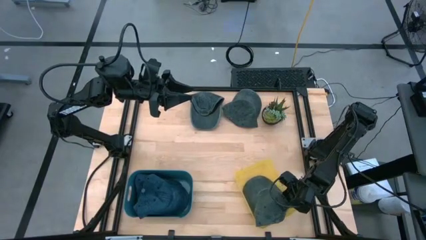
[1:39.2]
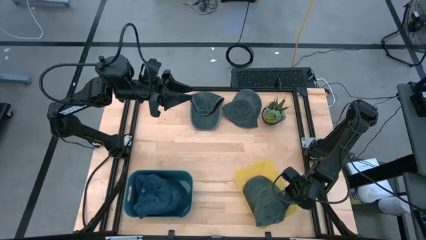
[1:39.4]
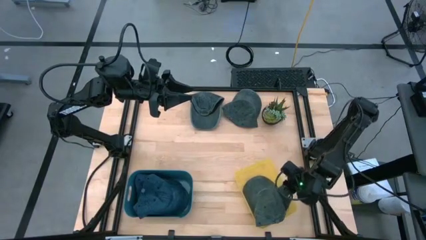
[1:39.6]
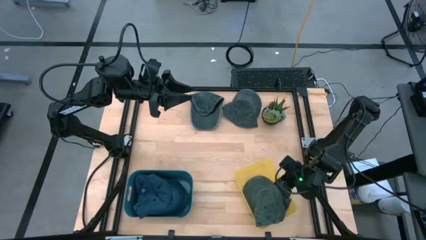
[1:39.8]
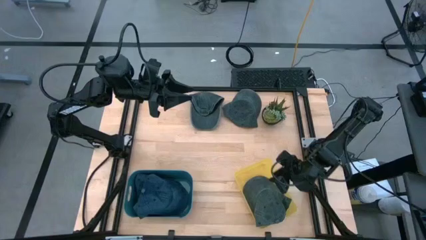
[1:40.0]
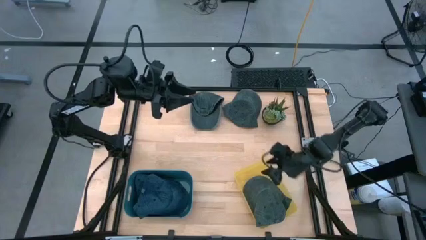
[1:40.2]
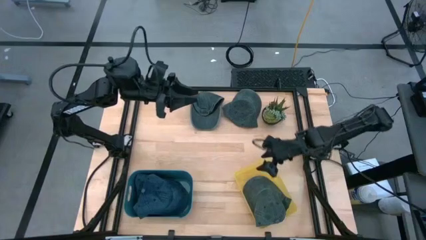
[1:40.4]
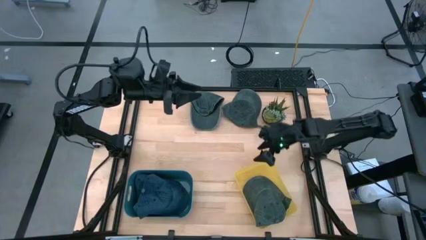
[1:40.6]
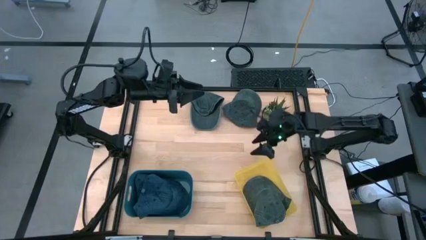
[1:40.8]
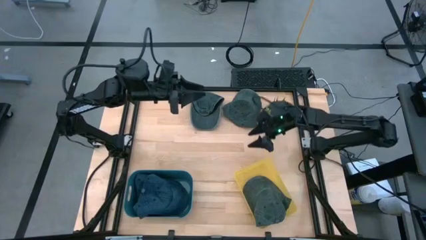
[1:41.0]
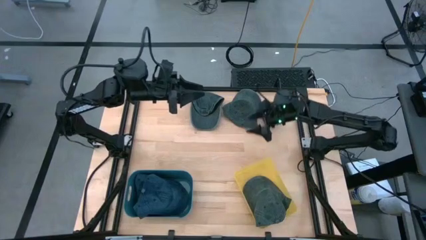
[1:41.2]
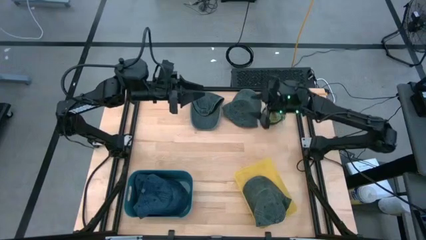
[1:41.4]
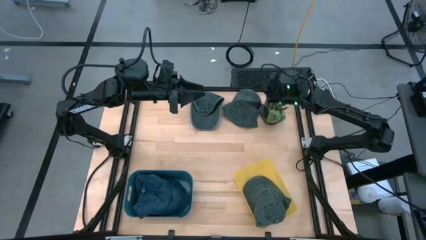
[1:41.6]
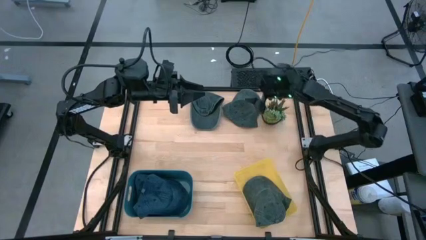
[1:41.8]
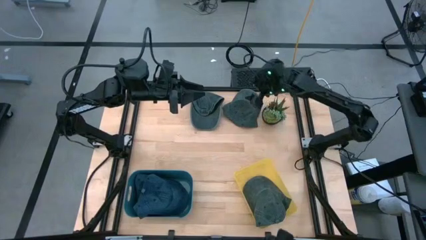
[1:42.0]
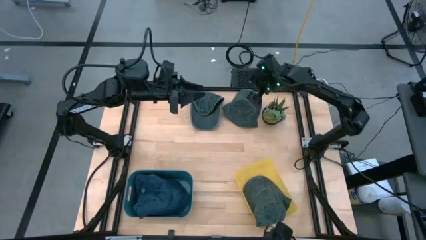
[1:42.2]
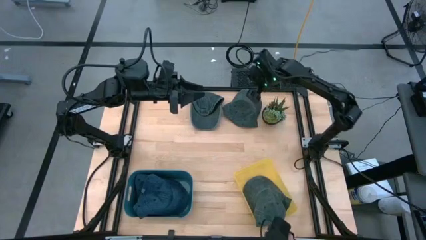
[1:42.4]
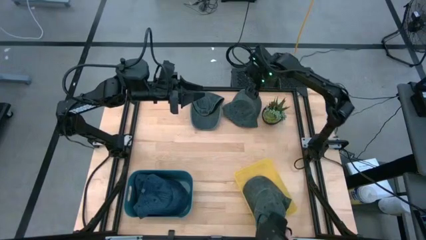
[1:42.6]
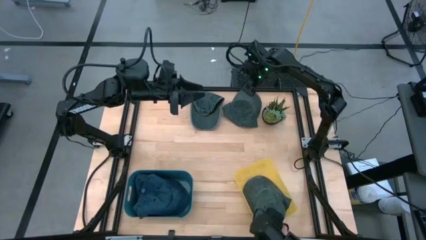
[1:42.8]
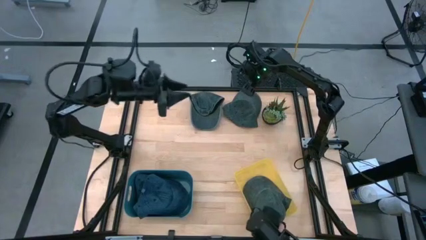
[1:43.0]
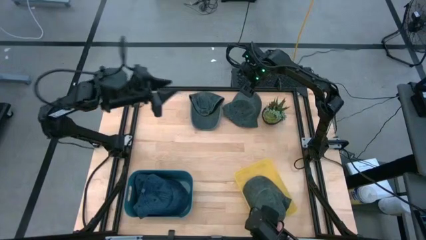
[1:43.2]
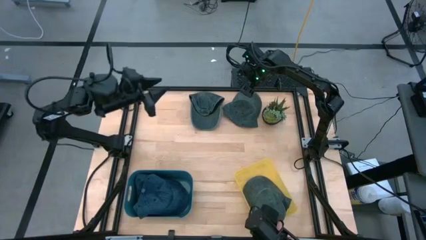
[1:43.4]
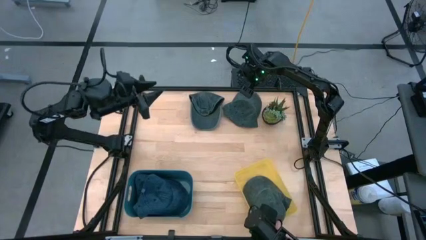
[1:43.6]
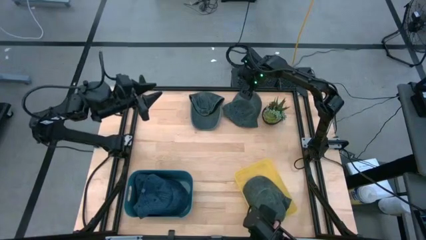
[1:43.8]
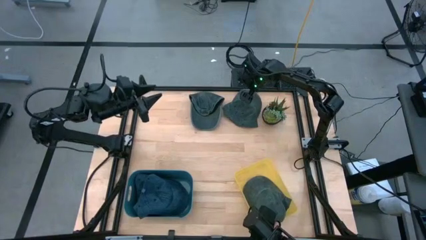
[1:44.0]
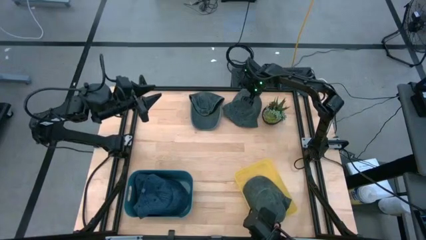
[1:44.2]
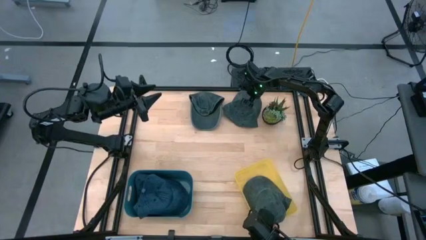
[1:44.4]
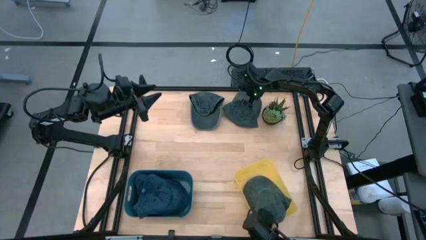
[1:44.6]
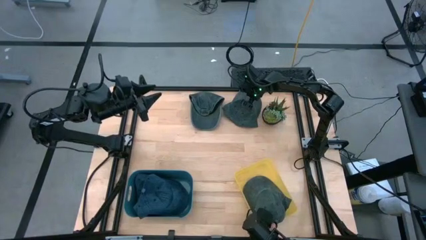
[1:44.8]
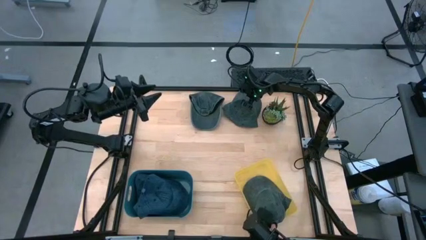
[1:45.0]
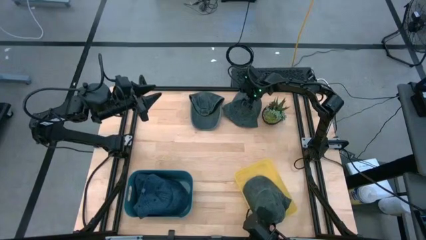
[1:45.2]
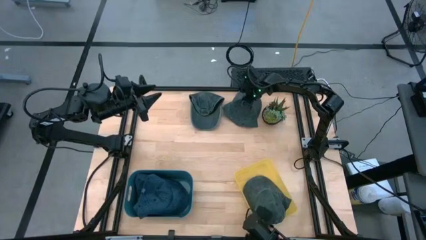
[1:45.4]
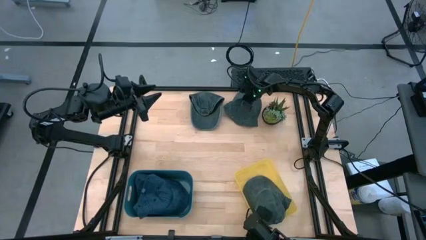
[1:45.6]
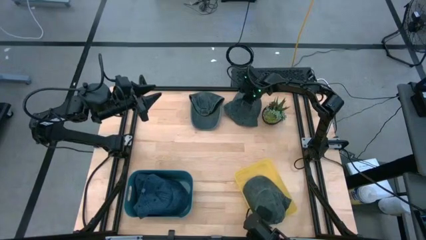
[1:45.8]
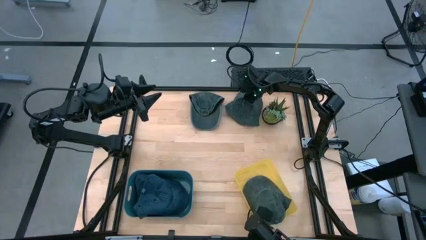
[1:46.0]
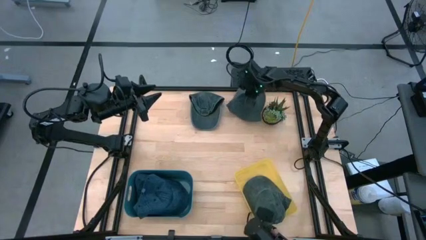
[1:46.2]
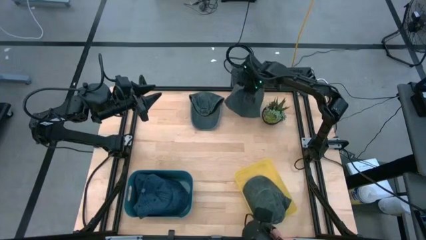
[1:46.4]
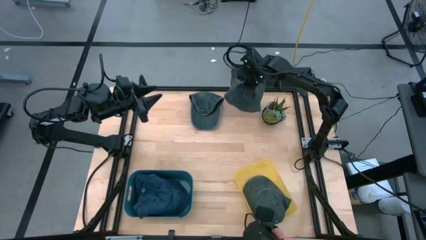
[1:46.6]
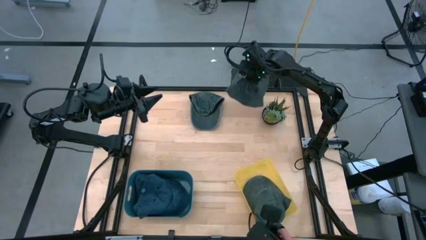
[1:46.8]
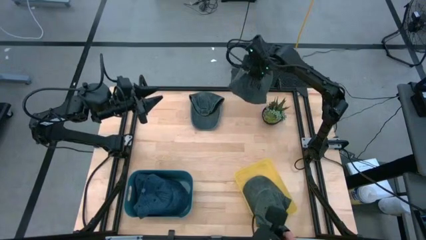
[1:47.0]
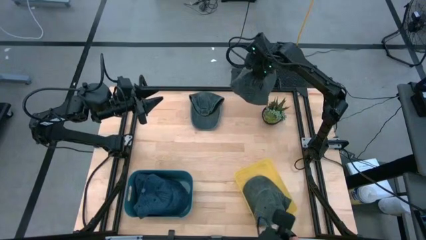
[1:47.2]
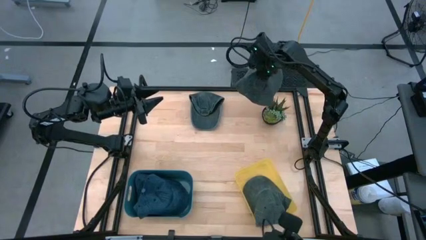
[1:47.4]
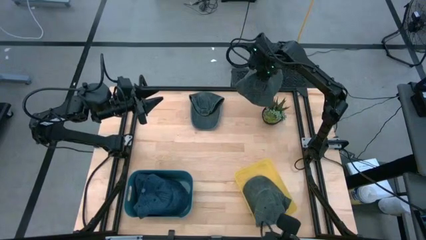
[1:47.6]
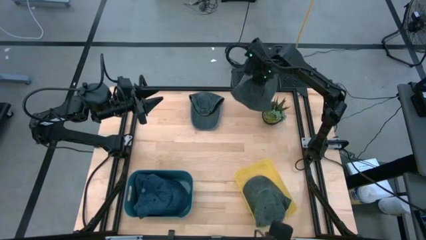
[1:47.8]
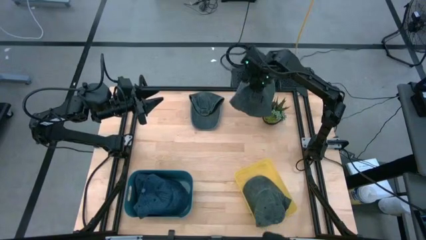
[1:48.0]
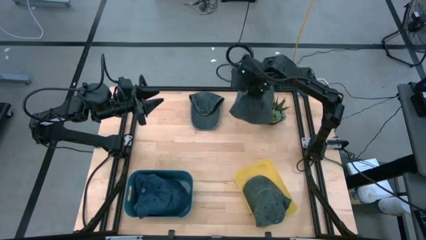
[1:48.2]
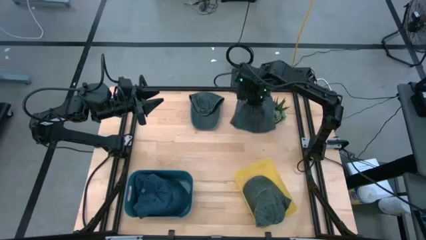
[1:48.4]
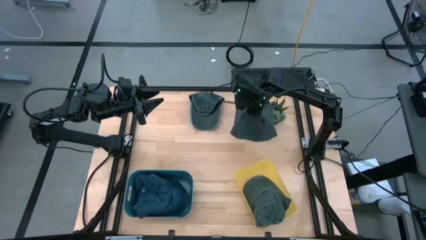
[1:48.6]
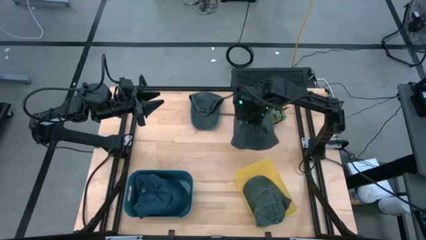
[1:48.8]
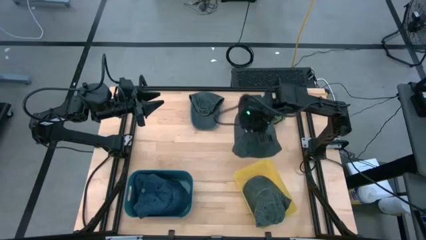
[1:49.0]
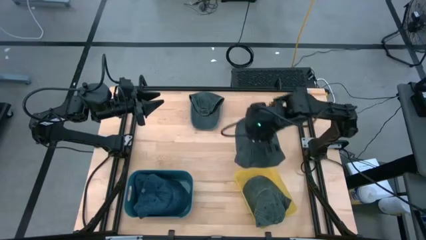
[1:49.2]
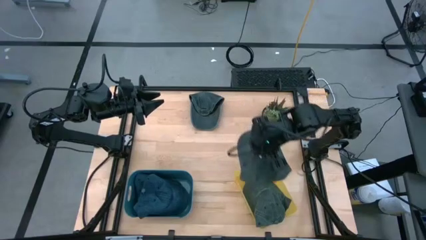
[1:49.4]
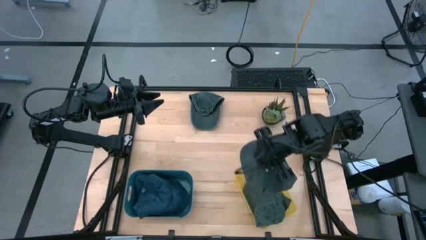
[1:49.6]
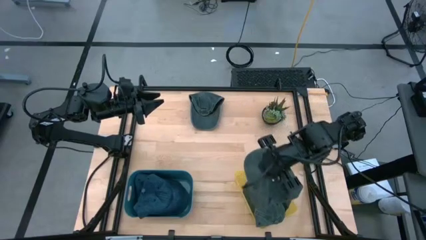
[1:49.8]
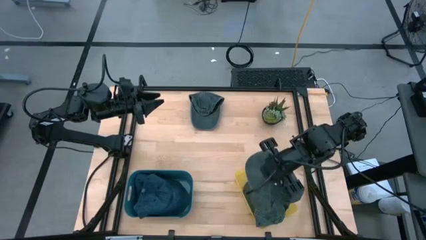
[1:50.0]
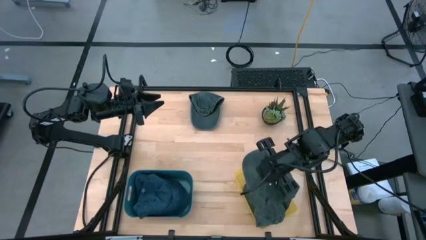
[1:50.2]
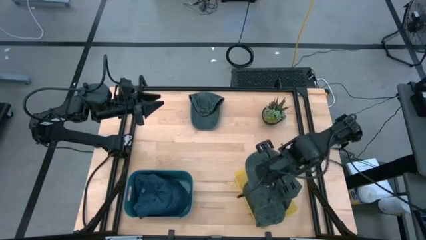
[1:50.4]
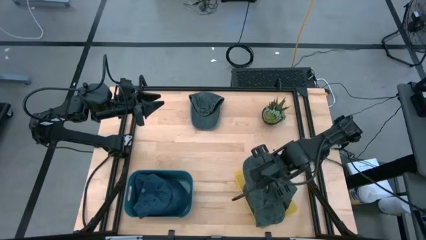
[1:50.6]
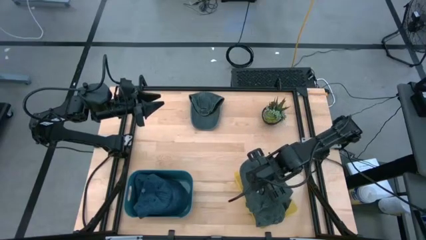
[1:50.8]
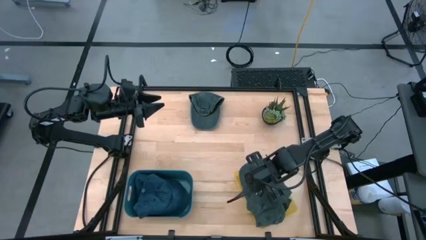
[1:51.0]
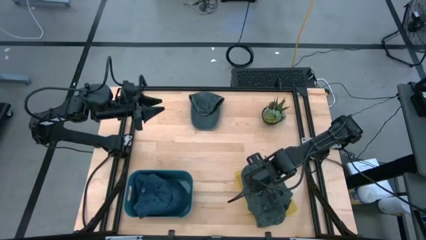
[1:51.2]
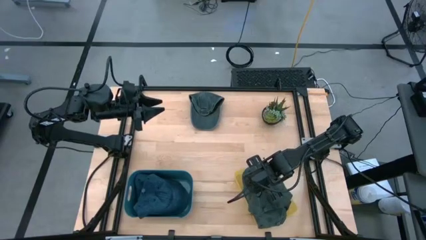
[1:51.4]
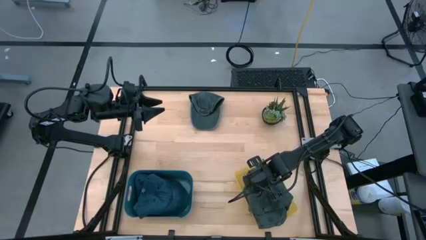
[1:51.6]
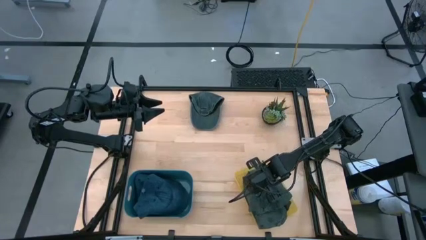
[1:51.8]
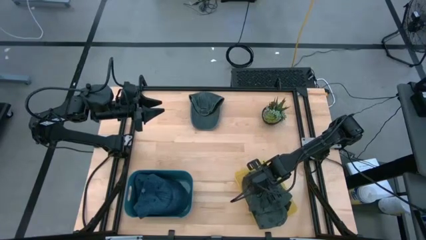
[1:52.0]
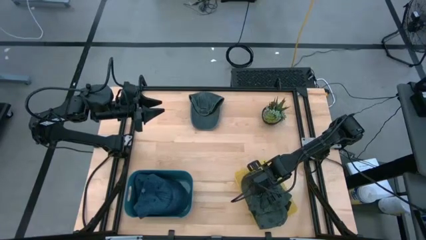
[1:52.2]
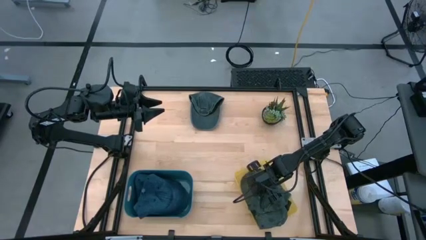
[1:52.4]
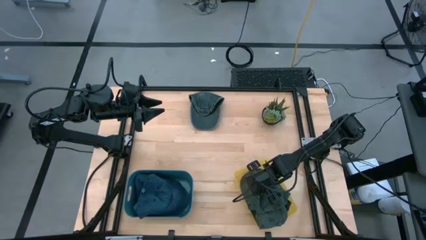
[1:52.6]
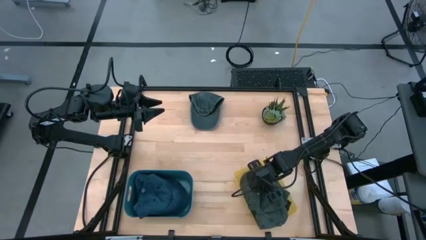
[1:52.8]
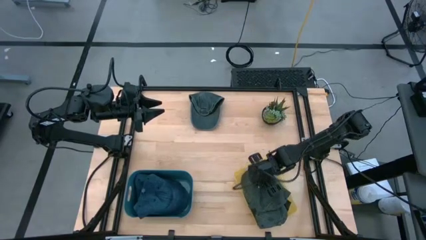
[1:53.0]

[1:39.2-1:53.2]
Task: Pick & Place hat
Put the right gray cap into the yellow bin

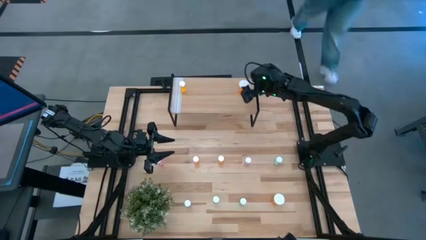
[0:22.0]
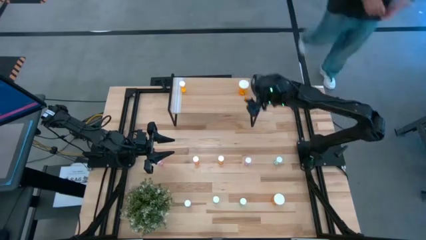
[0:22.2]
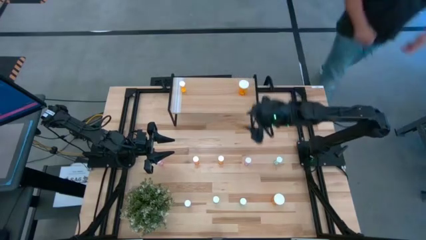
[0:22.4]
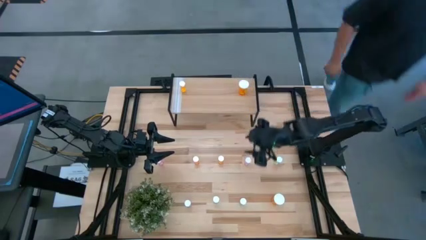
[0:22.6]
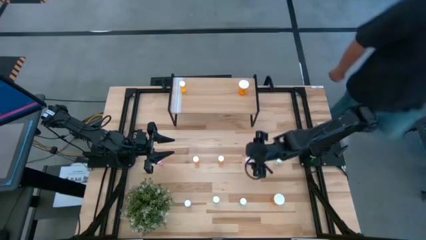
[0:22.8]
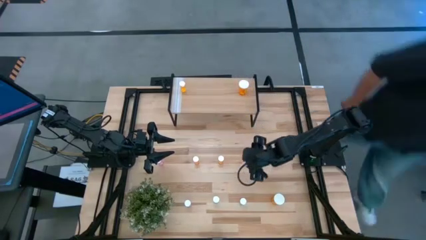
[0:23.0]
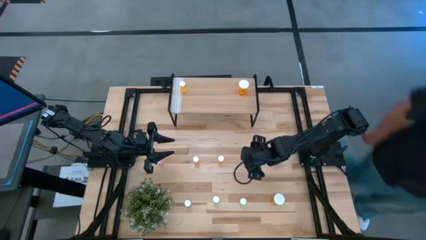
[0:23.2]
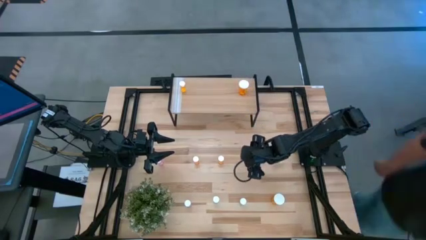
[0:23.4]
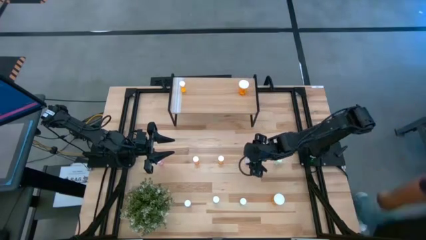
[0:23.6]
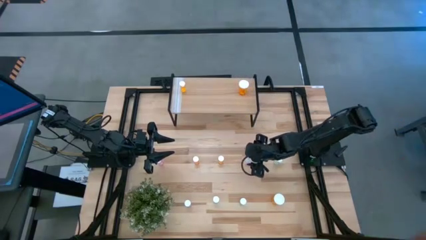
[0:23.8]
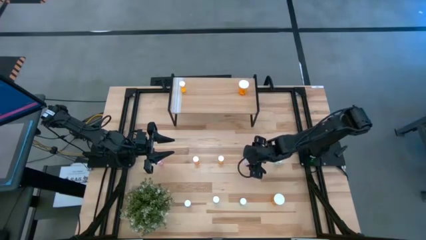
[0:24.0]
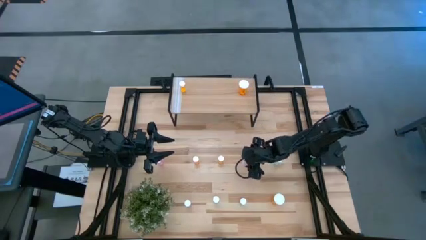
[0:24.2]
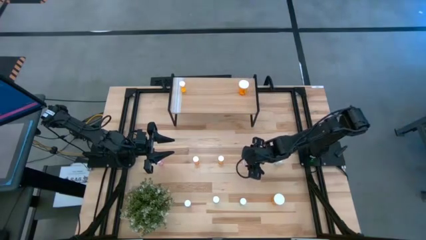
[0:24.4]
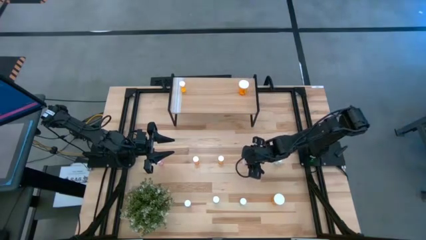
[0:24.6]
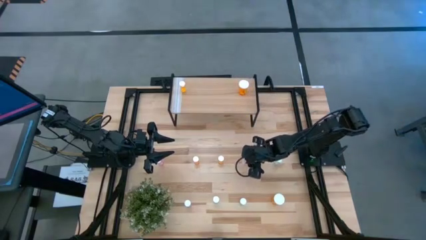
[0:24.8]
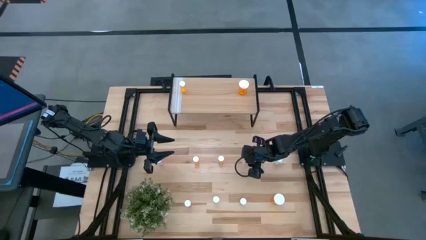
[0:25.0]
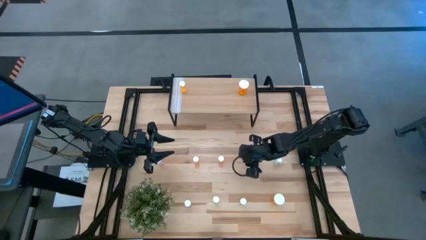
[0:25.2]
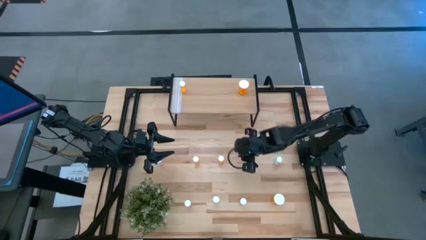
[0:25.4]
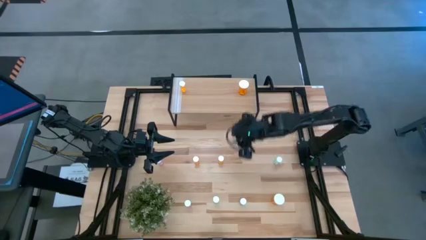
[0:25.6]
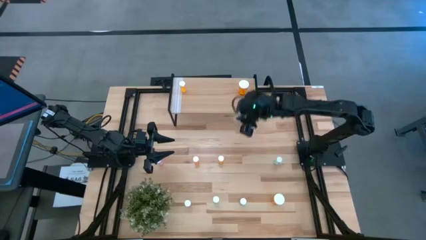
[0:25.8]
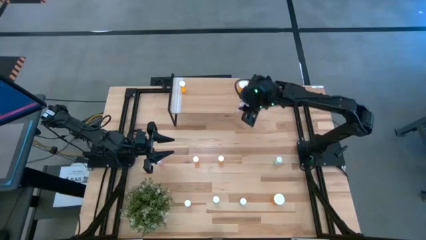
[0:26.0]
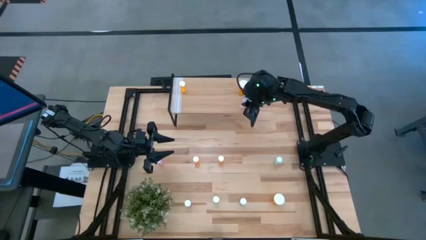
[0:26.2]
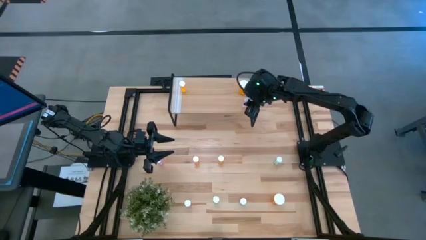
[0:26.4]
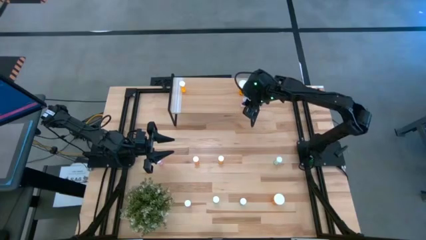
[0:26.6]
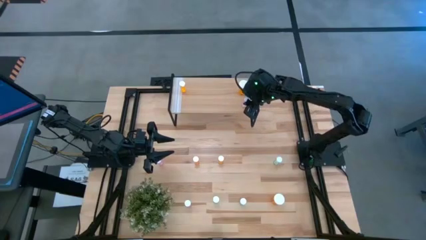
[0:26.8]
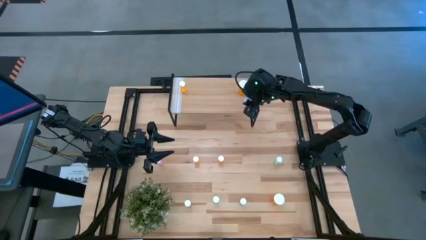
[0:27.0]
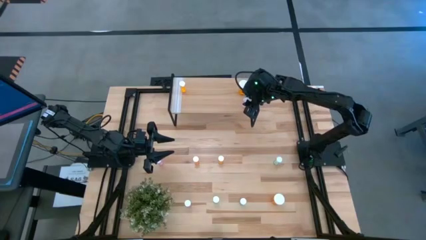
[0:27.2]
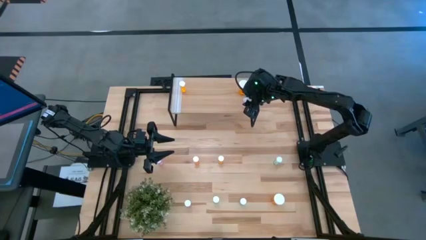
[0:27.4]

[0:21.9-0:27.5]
Task: Pick and place medicine bottles onto shelf by color
Put the top right small pink pill bottle on the shelf
